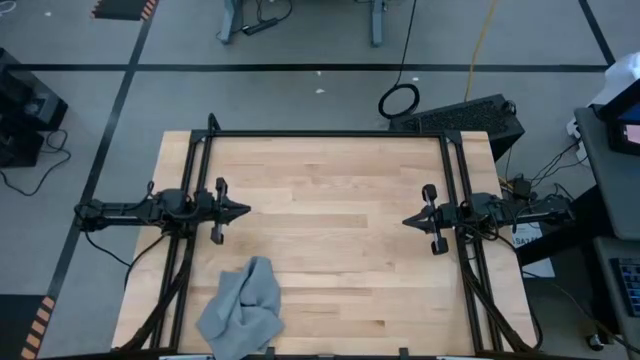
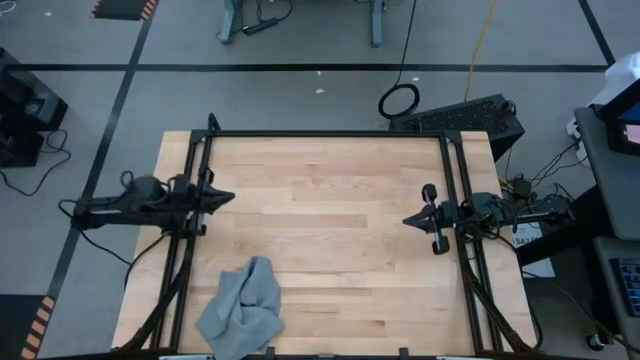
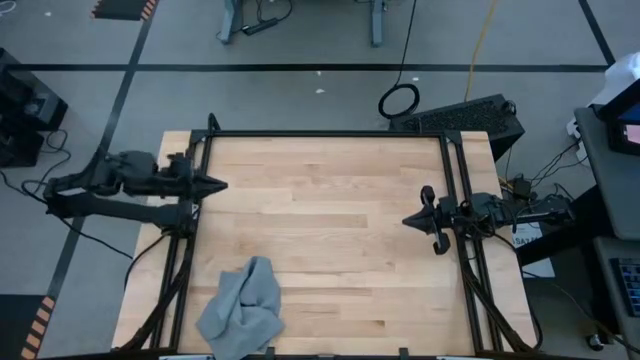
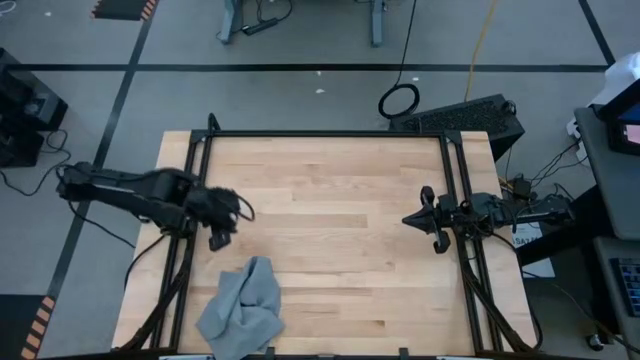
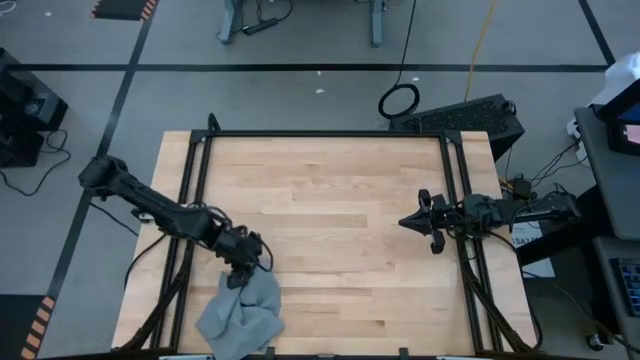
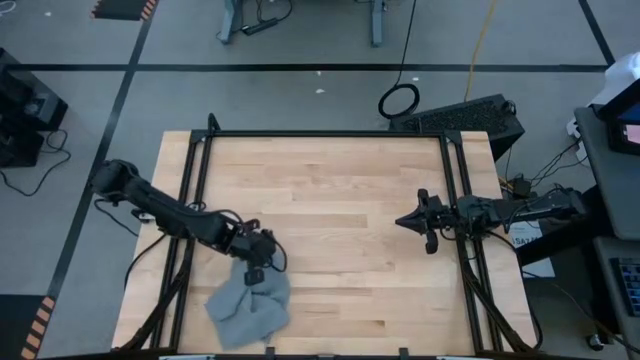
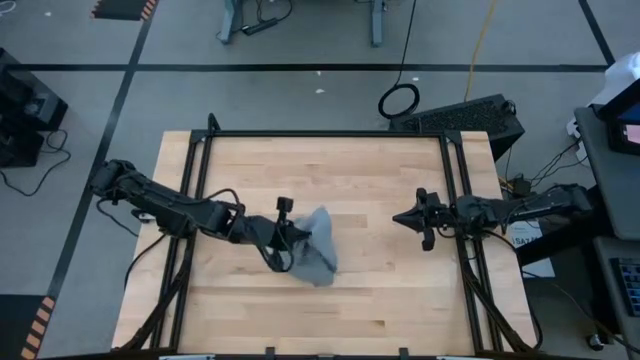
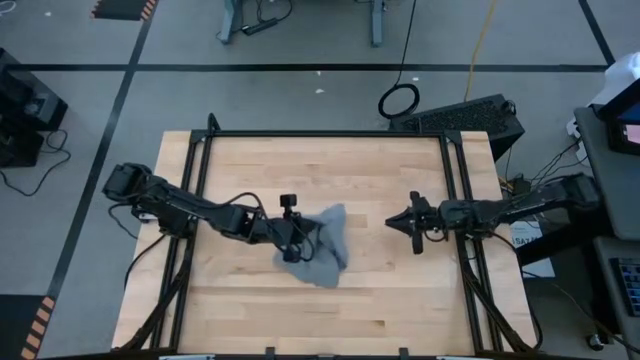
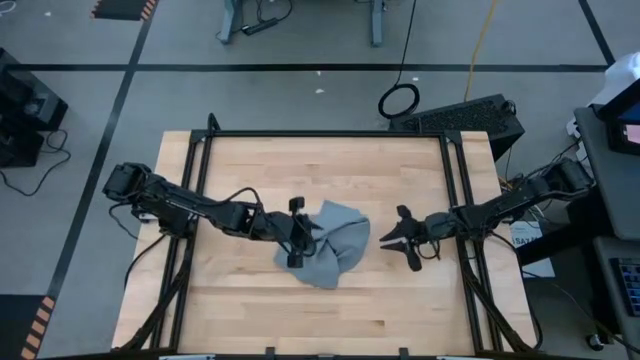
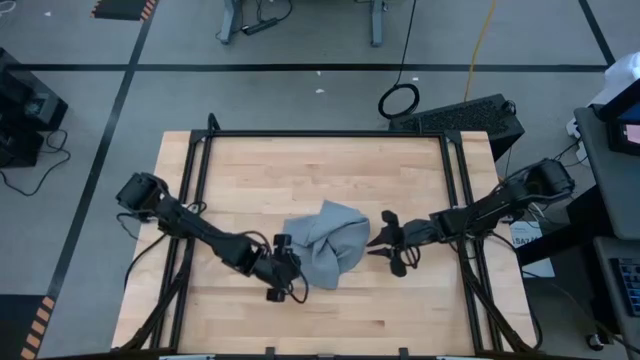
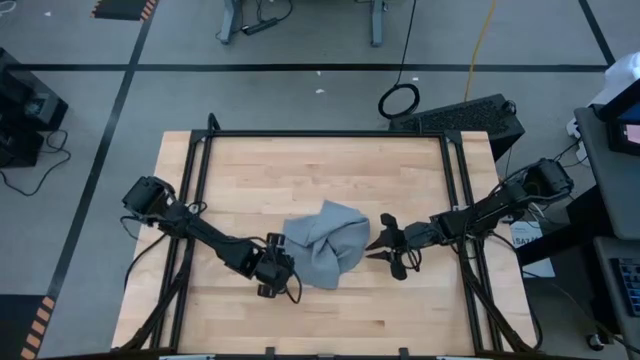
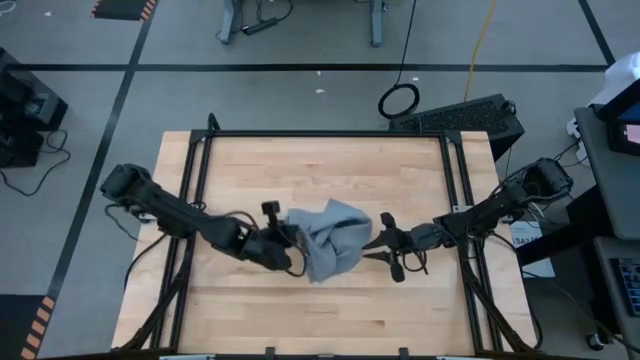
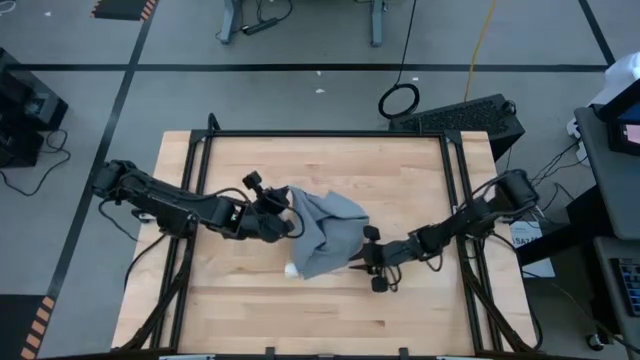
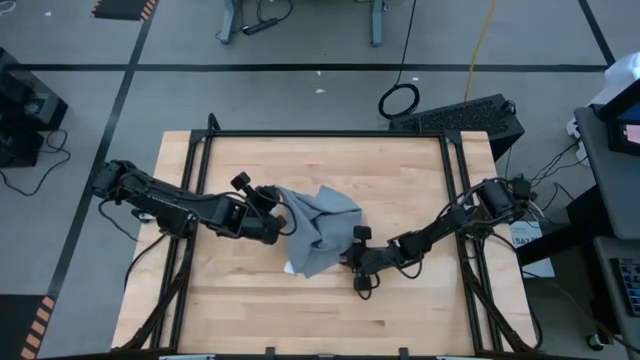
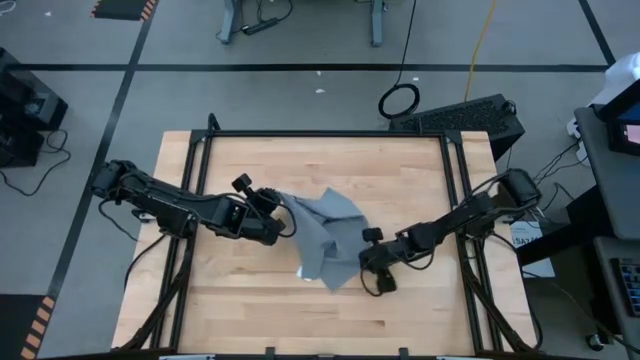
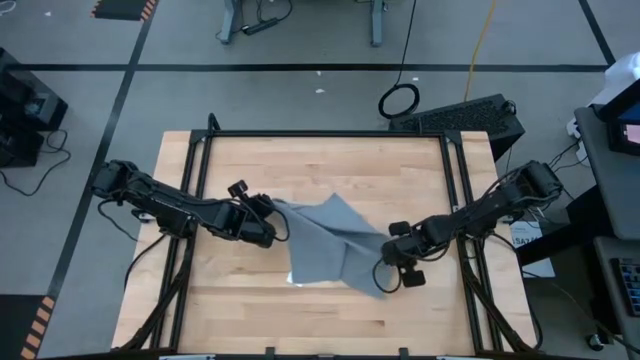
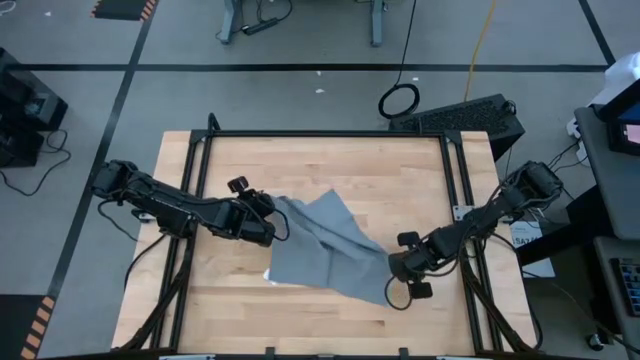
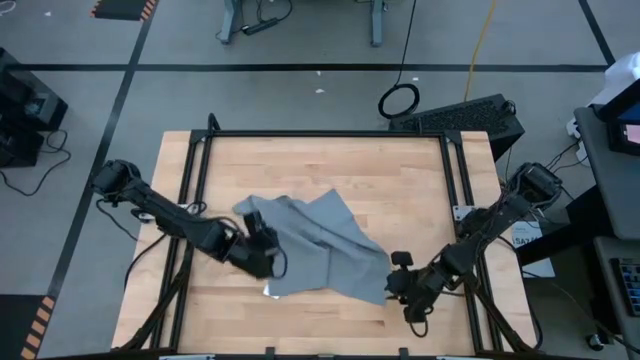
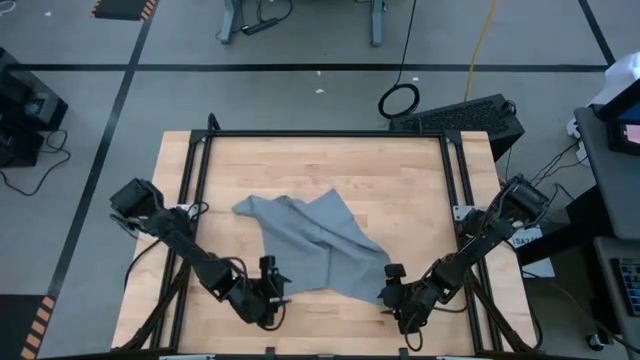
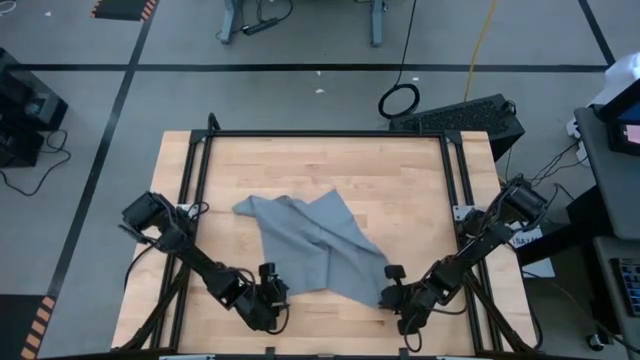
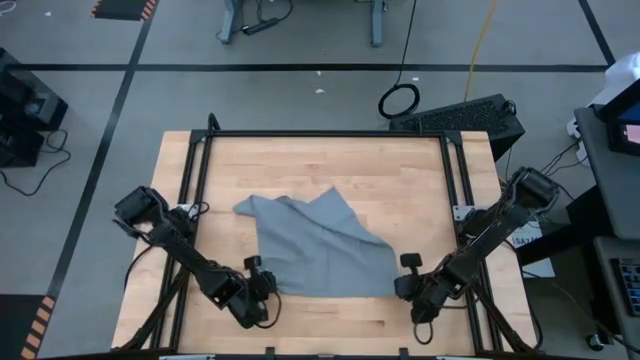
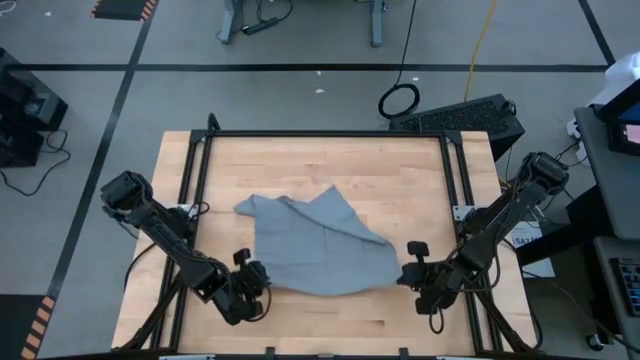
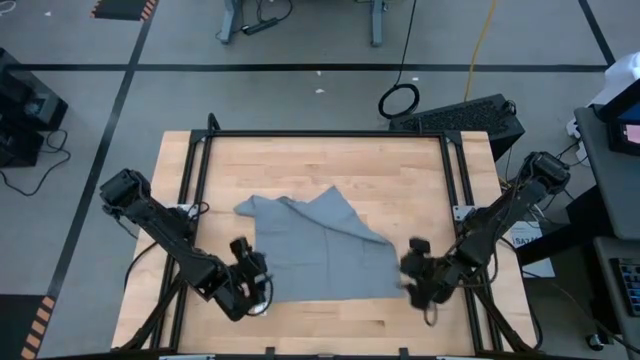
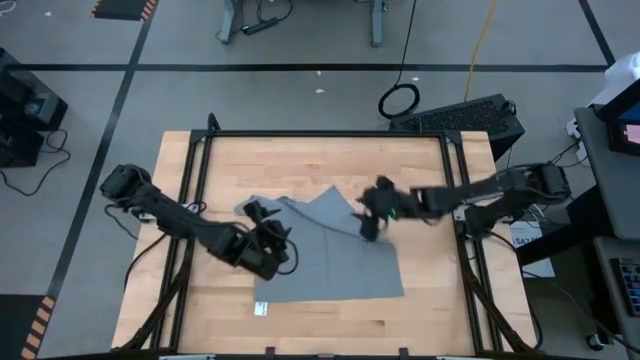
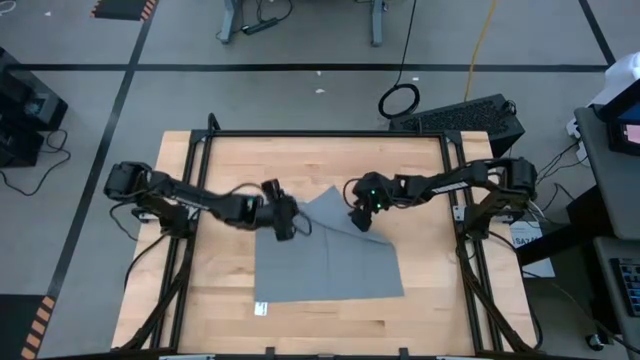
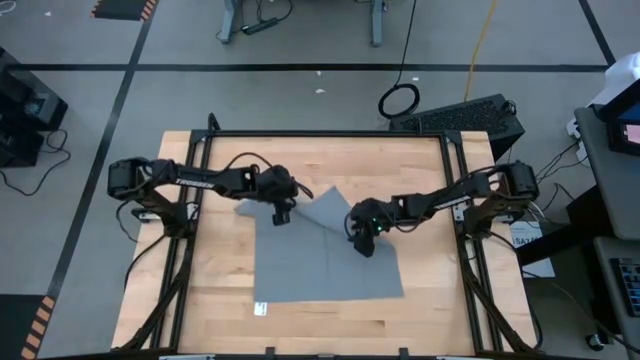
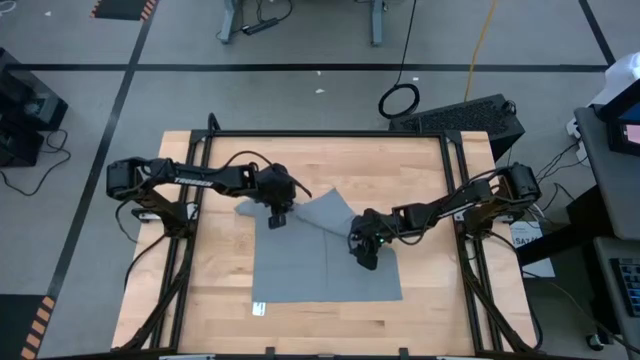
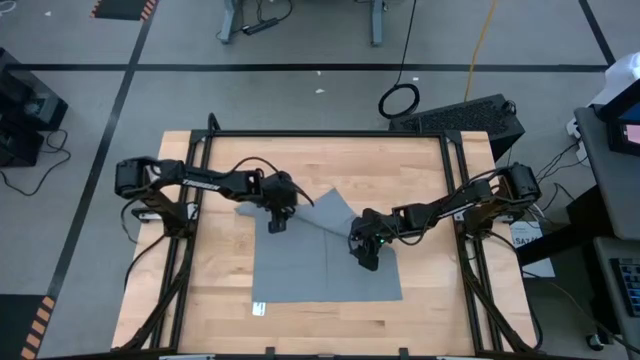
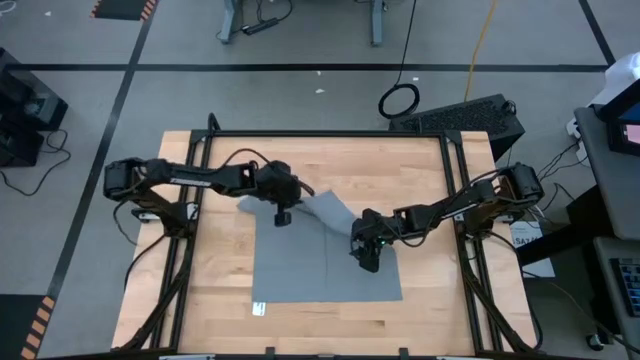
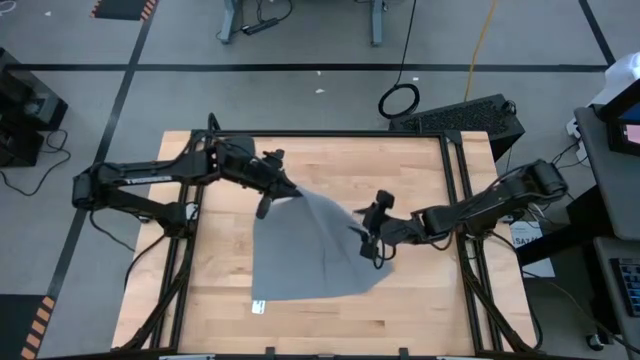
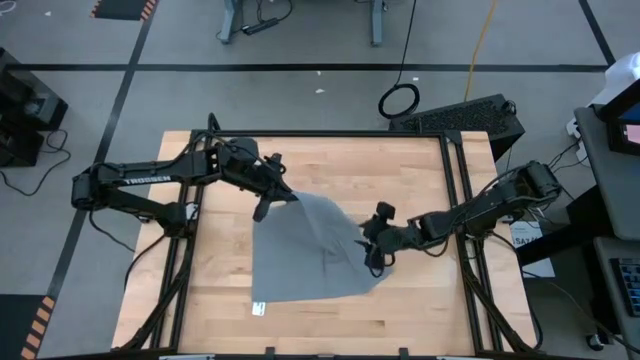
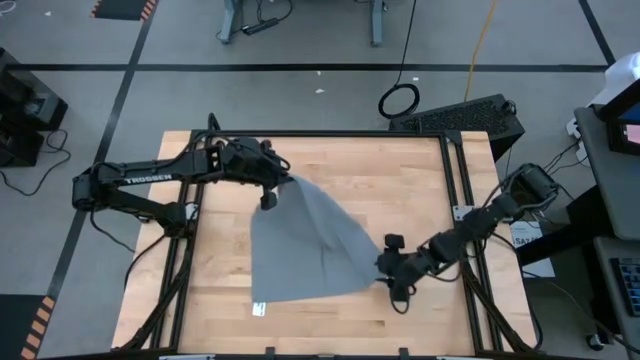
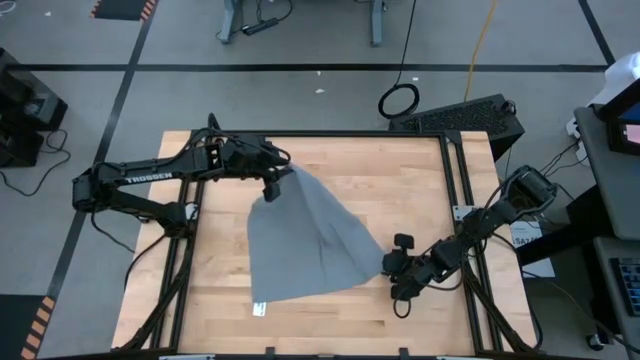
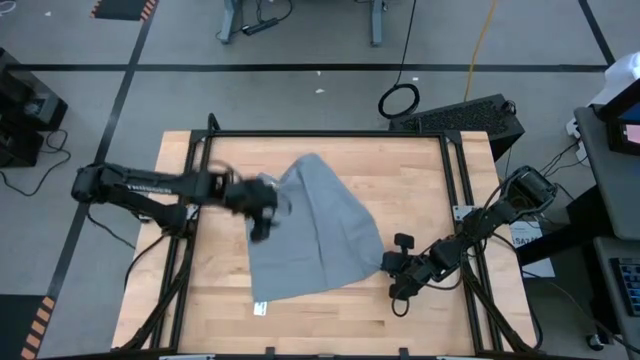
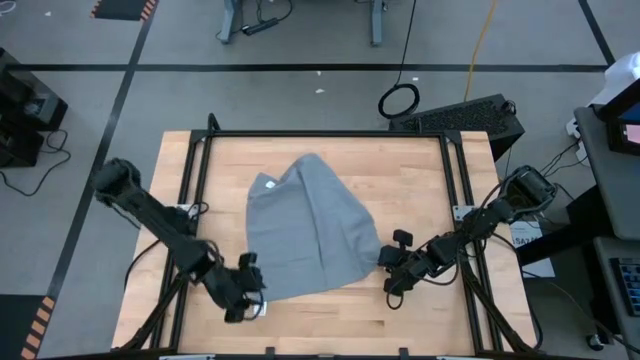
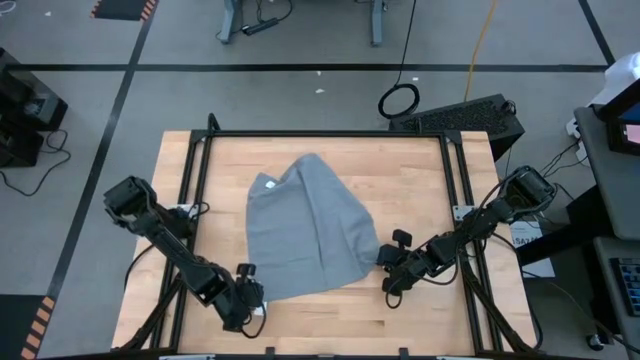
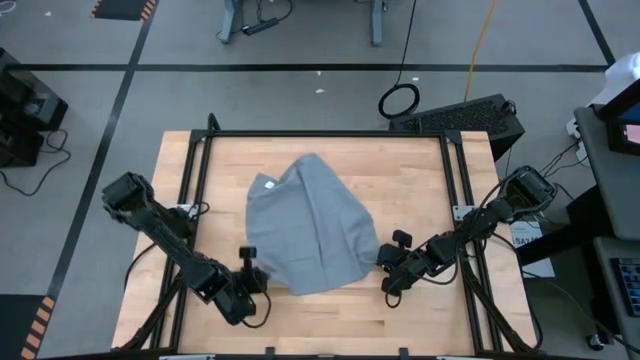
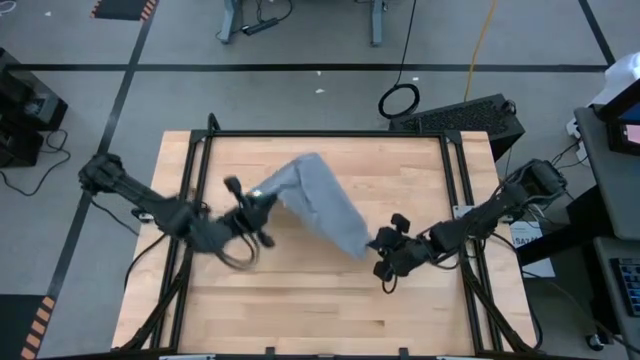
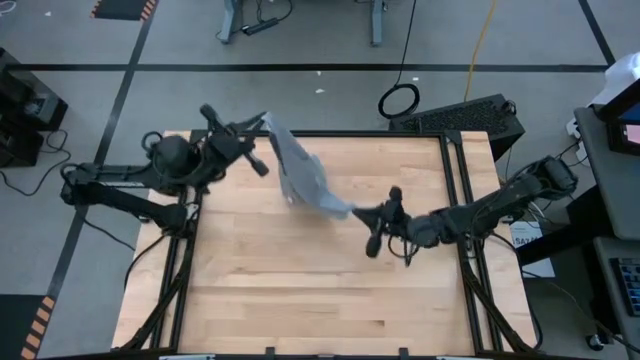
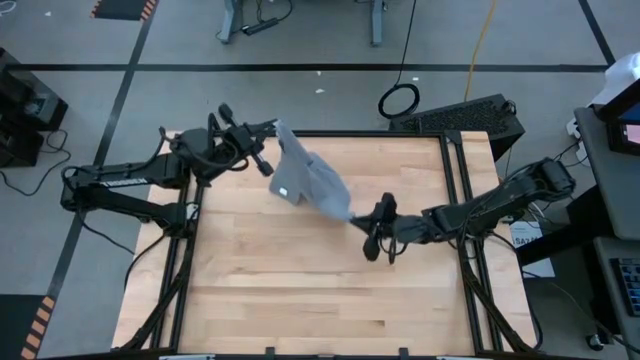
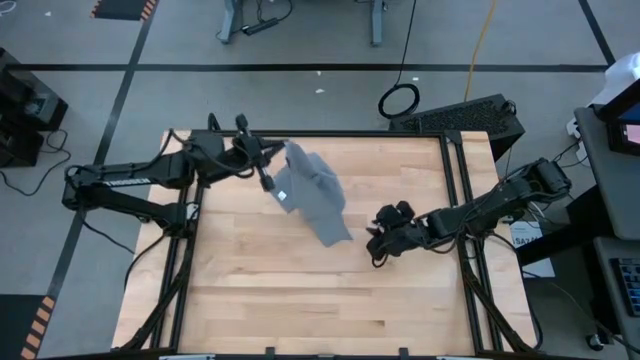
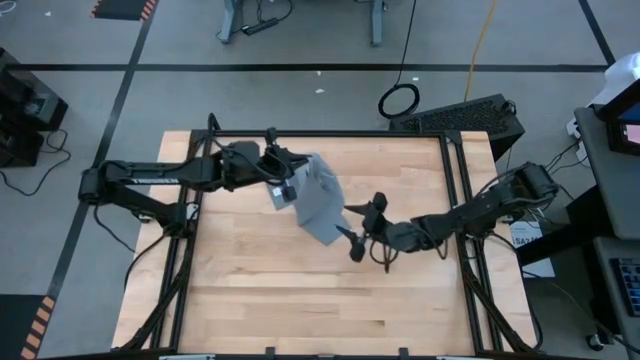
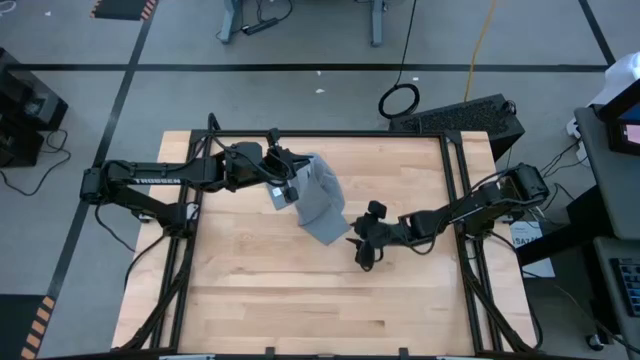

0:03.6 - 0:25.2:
Task: Roll towel
Fold the gray towel on the table
